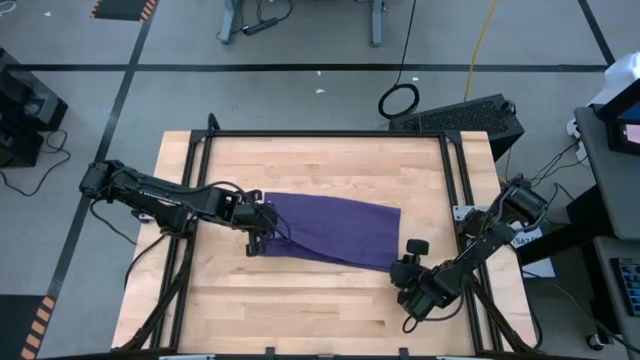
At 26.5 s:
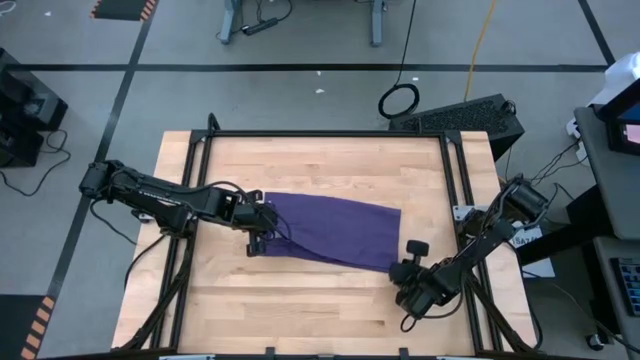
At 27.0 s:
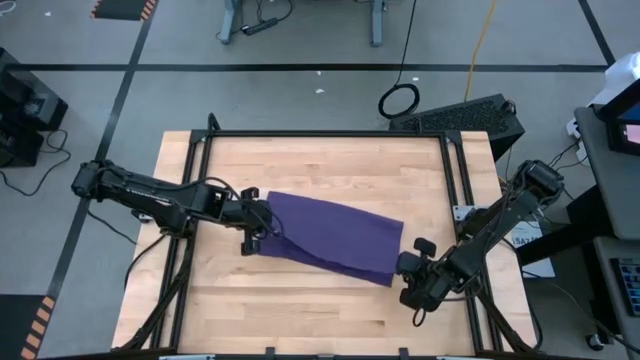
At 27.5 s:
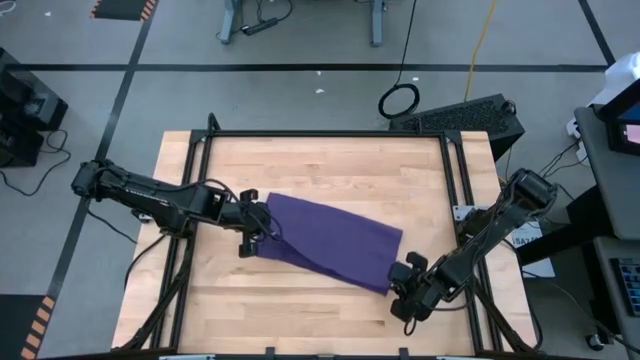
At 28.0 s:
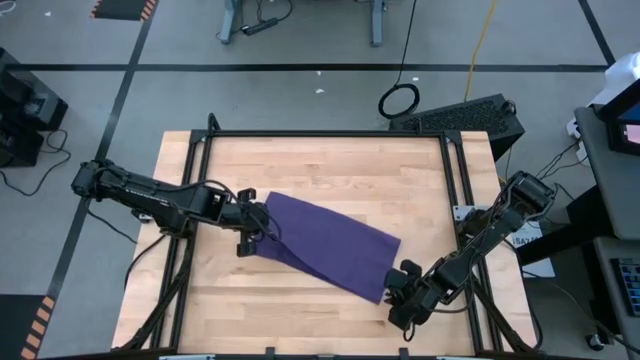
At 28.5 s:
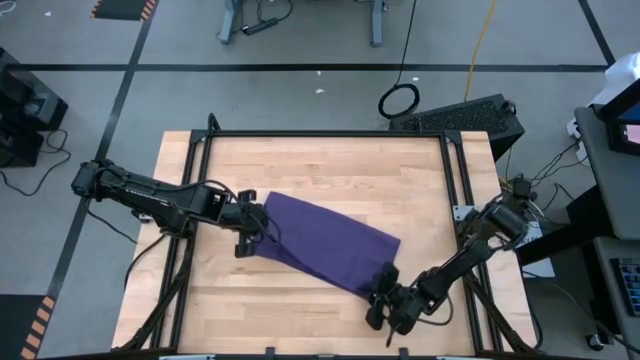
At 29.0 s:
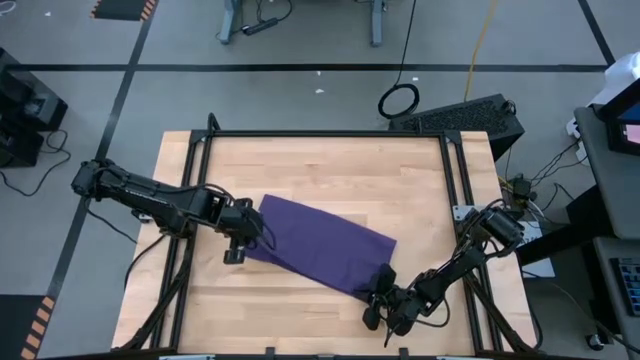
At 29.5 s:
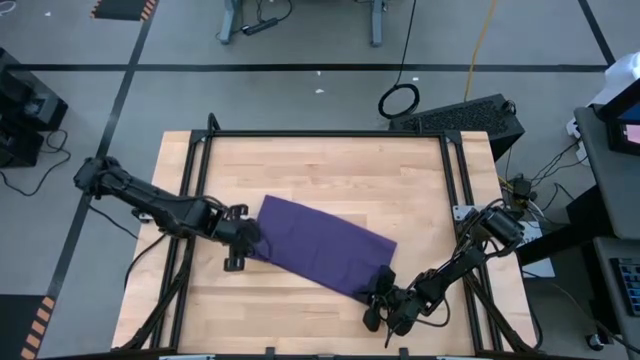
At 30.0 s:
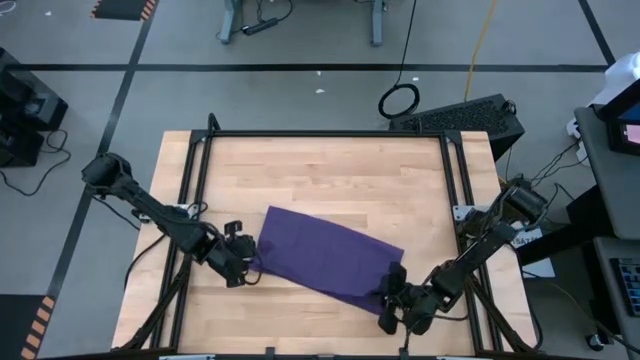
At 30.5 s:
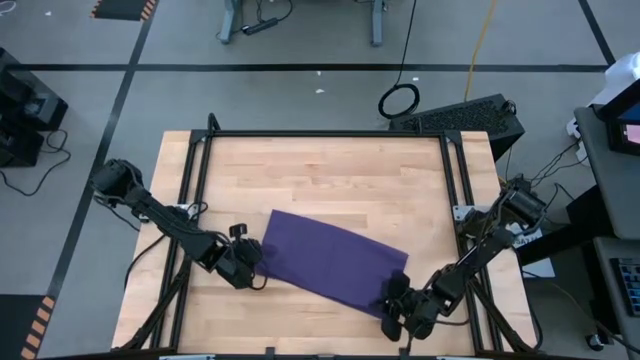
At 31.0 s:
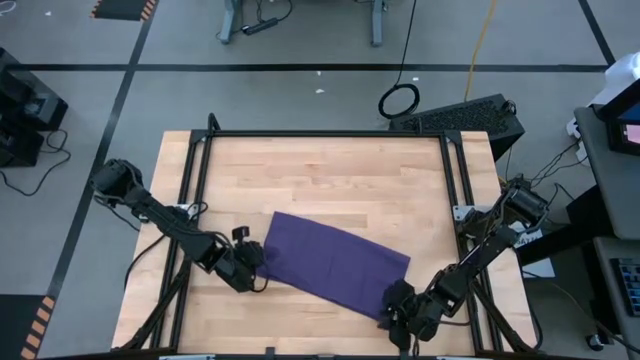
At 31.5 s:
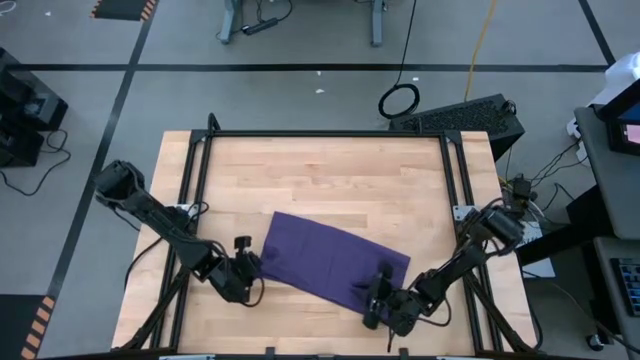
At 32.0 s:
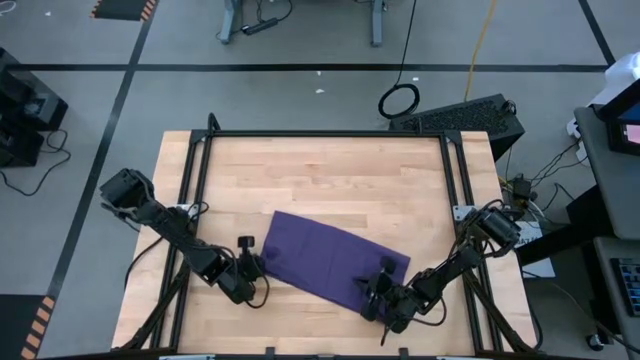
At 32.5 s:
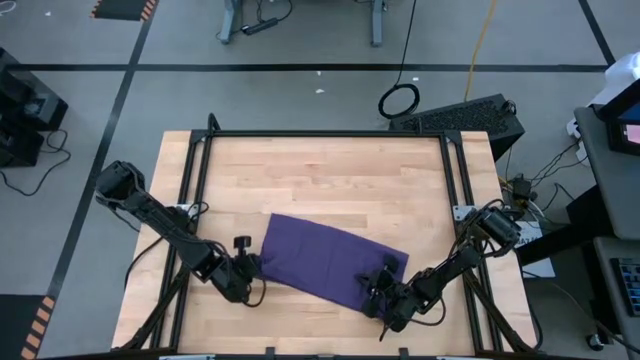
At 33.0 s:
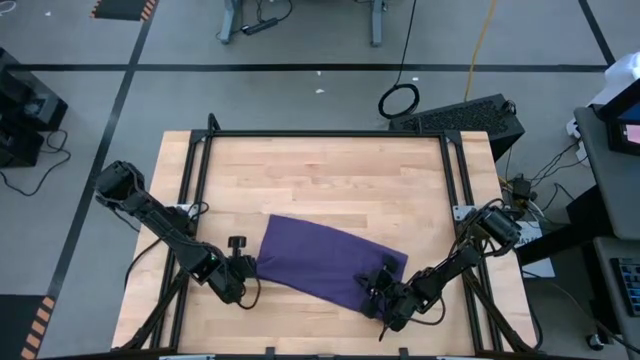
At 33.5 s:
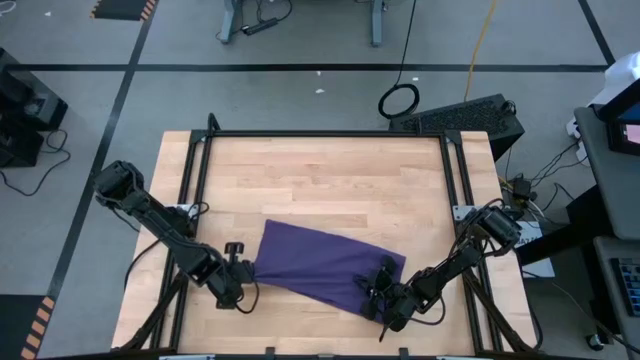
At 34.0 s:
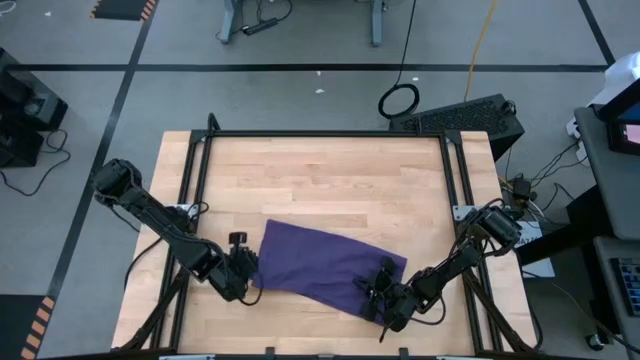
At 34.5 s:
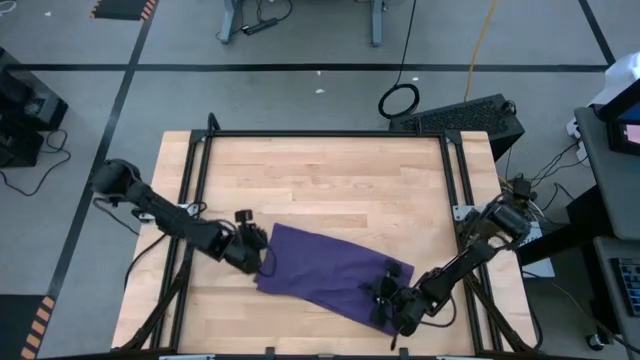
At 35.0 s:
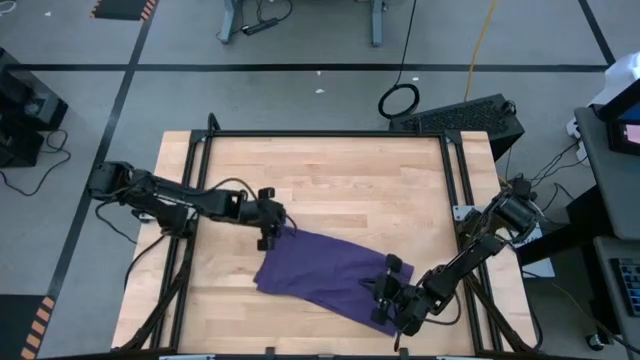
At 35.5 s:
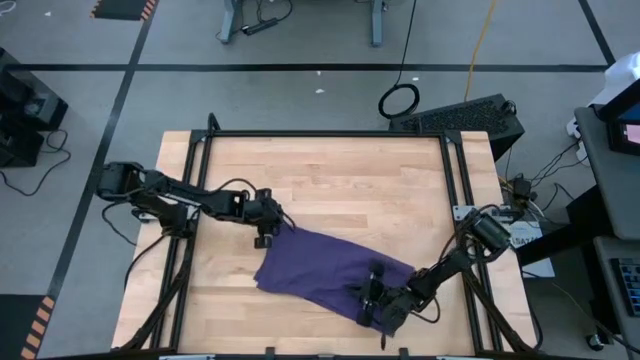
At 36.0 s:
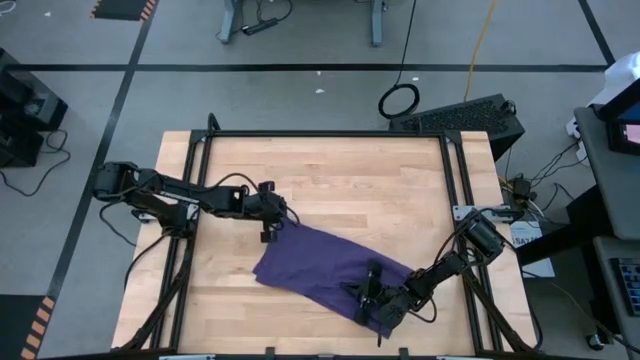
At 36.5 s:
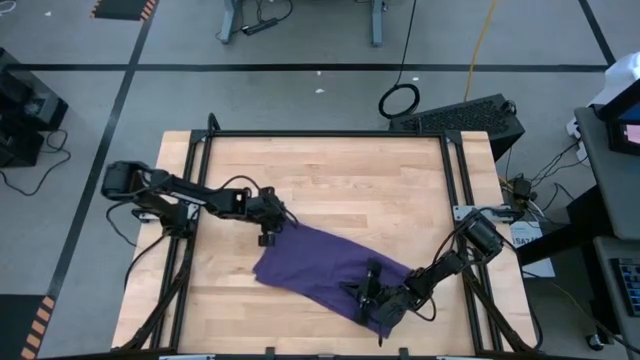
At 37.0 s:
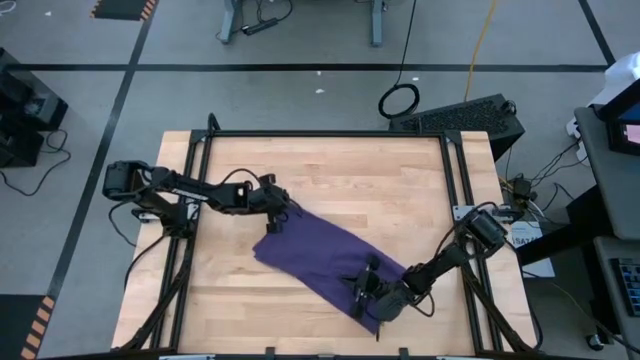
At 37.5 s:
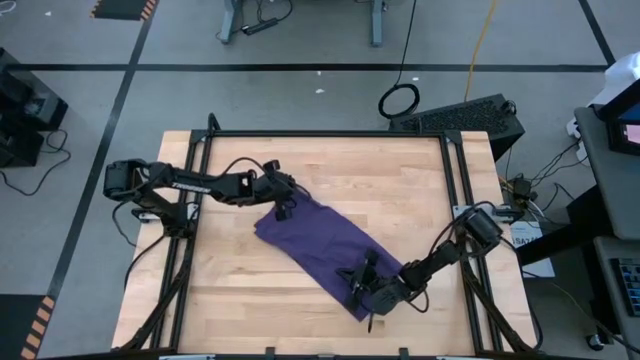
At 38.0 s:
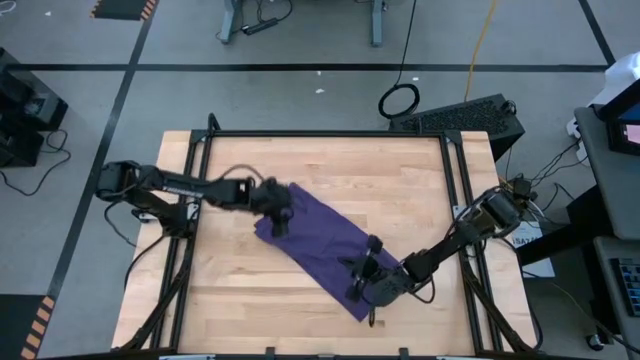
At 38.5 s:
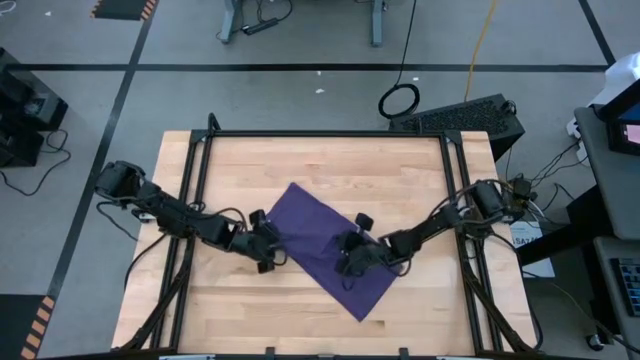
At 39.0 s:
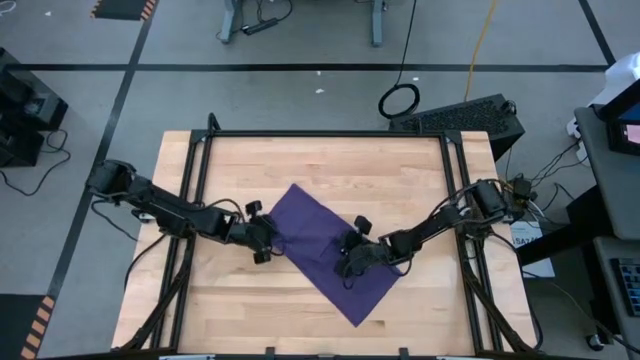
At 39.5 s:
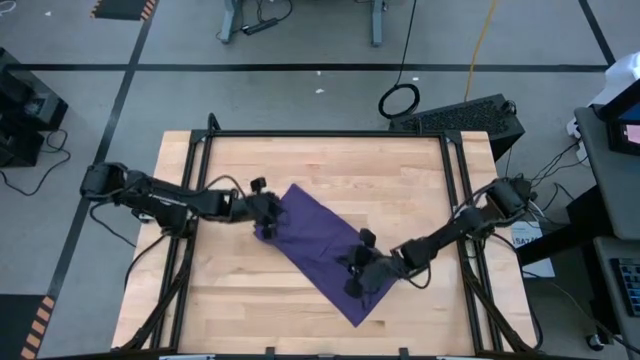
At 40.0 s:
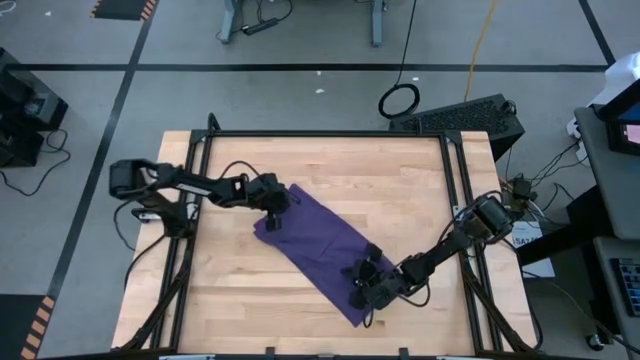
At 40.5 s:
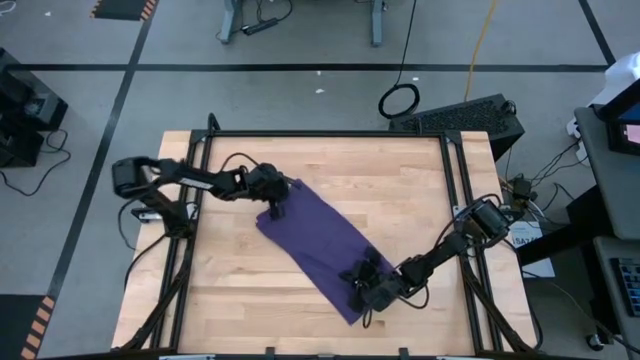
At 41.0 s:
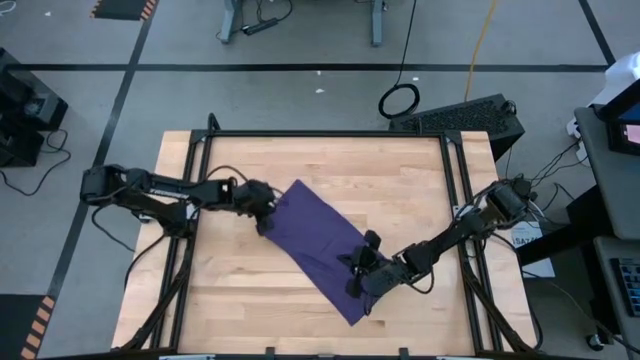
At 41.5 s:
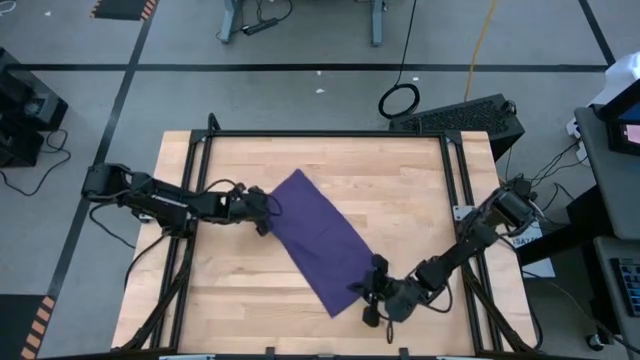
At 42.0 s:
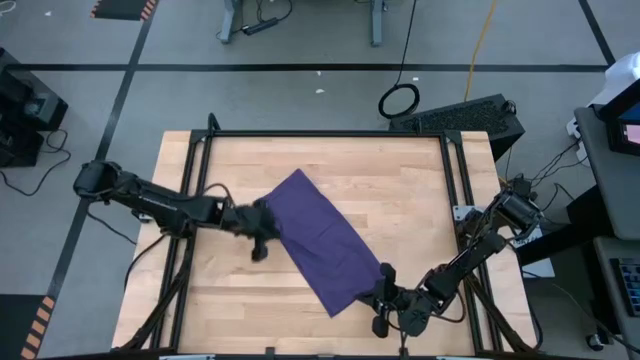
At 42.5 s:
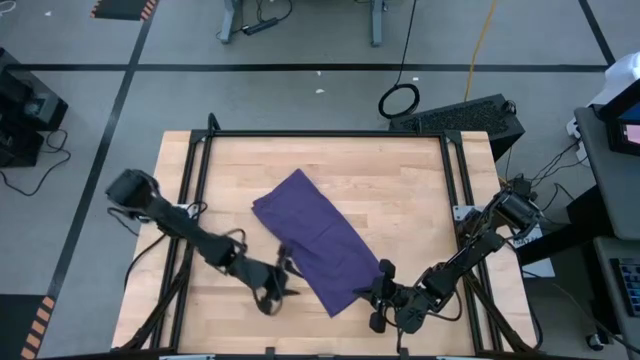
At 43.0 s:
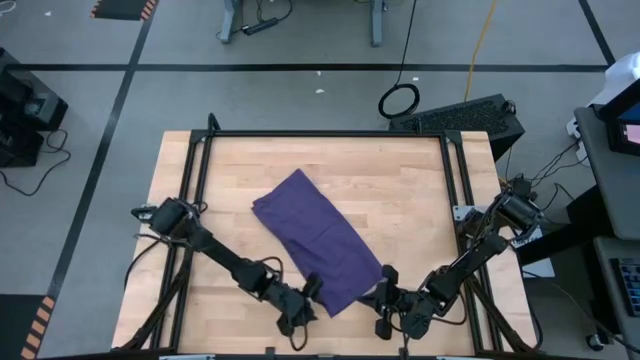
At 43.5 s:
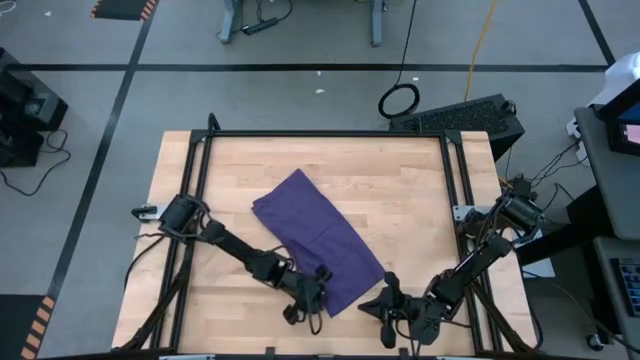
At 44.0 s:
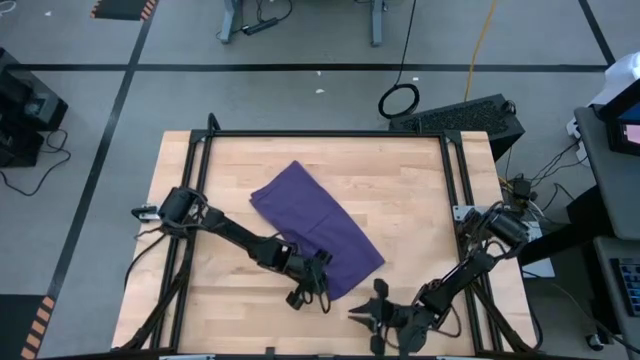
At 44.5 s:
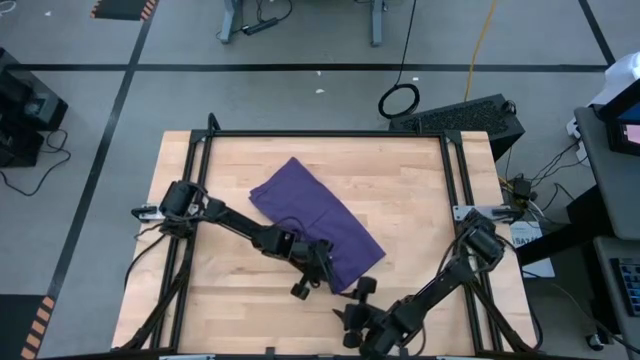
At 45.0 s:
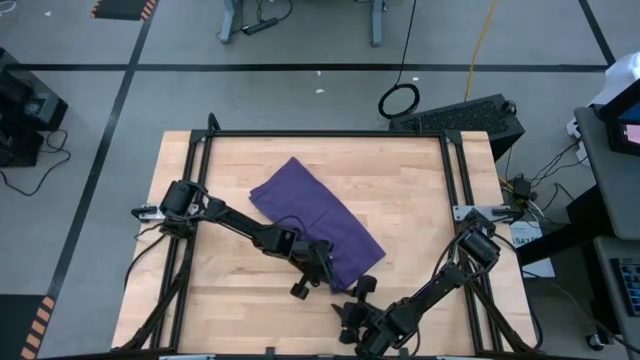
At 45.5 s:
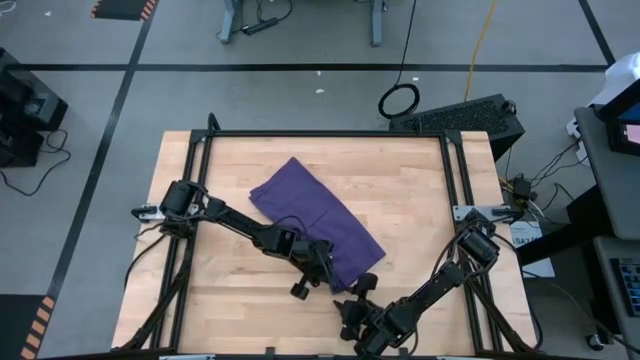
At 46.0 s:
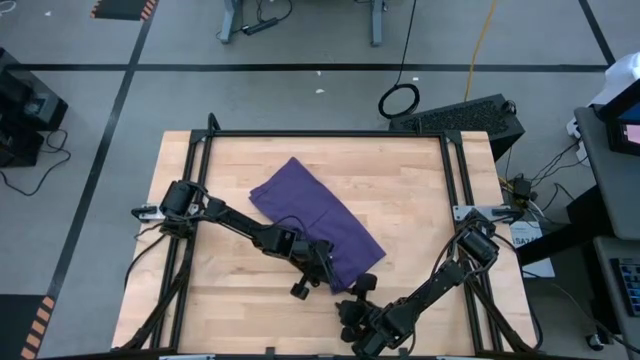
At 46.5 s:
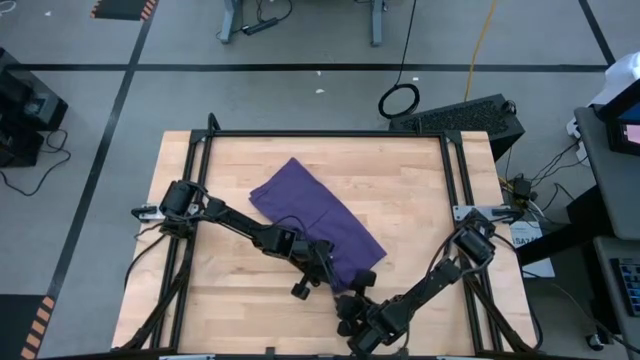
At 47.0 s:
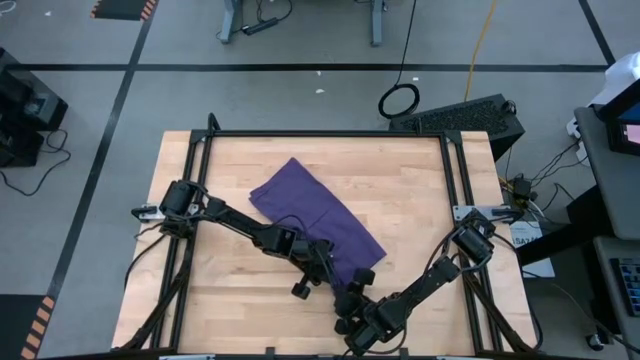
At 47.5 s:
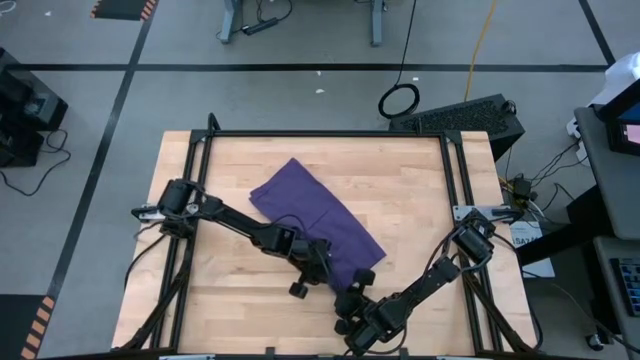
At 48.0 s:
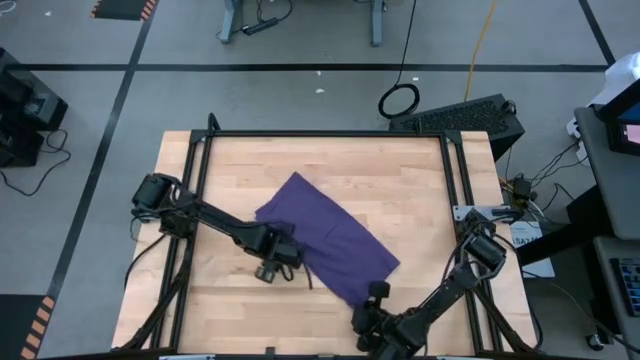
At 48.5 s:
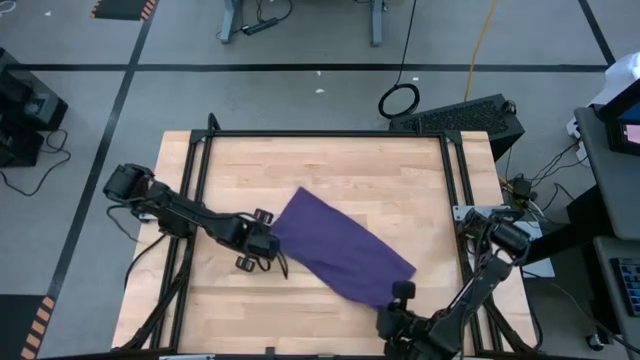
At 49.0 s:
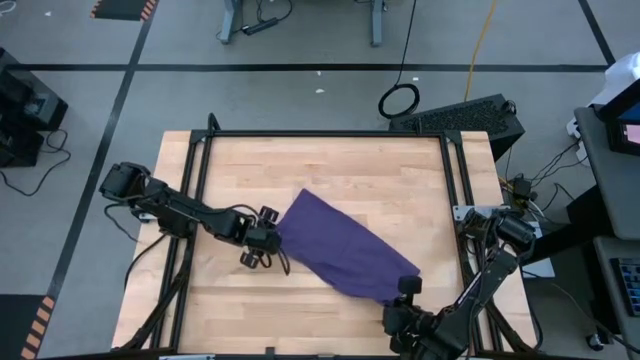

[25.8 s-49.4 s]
Task: Roll towel into tight, uniform cylinder
Fold the purple towel on the table
